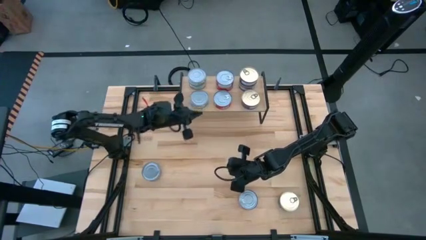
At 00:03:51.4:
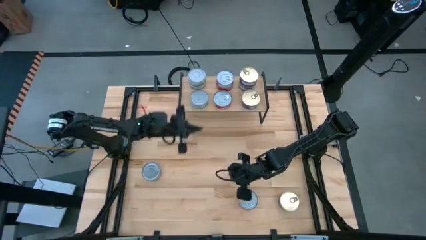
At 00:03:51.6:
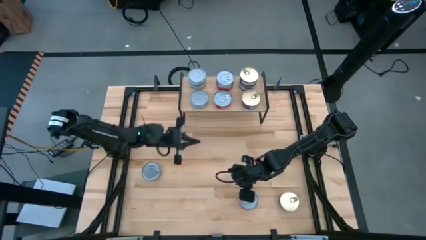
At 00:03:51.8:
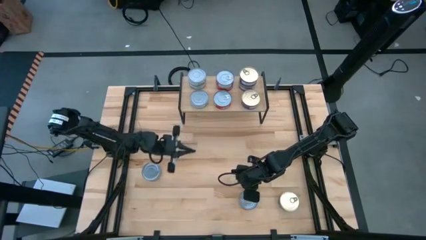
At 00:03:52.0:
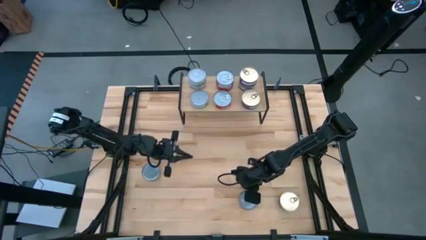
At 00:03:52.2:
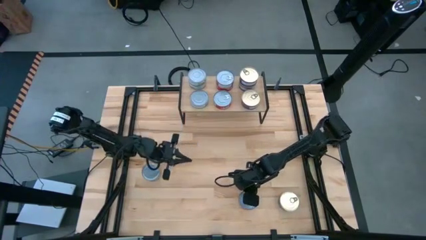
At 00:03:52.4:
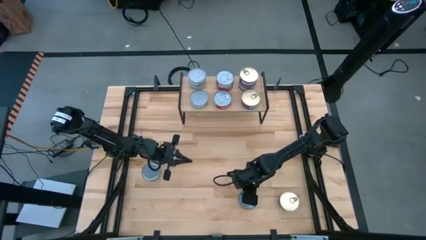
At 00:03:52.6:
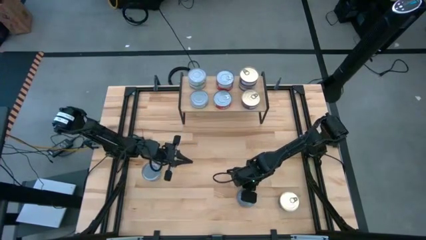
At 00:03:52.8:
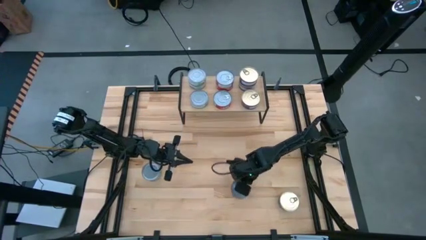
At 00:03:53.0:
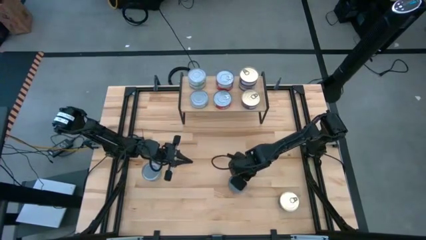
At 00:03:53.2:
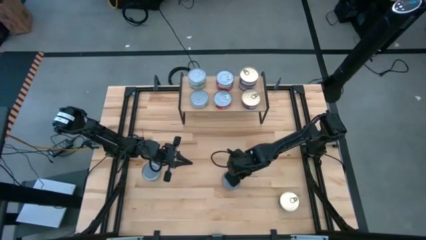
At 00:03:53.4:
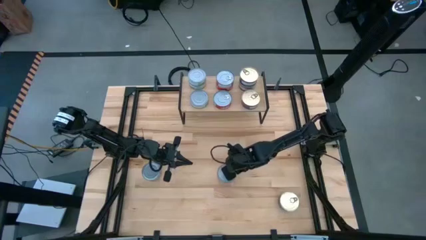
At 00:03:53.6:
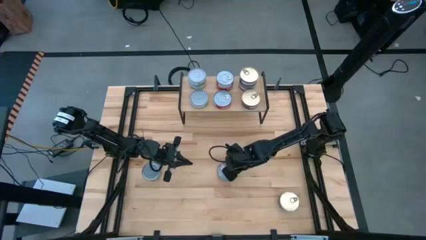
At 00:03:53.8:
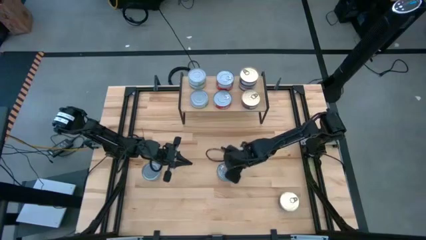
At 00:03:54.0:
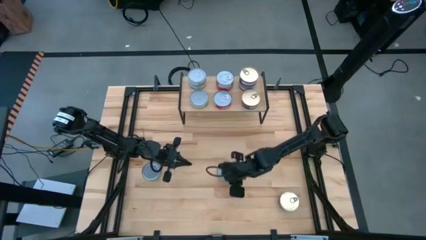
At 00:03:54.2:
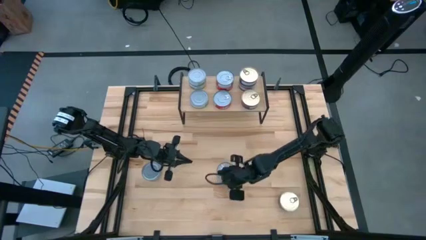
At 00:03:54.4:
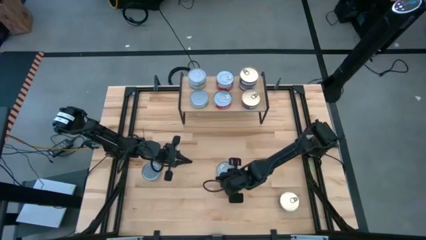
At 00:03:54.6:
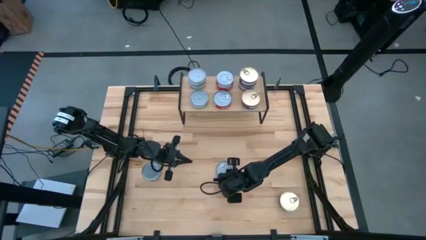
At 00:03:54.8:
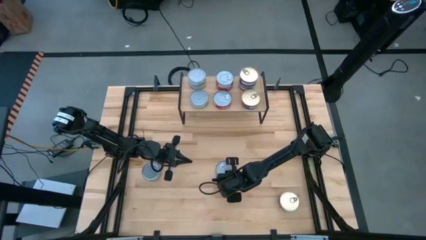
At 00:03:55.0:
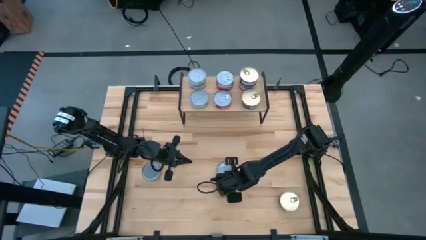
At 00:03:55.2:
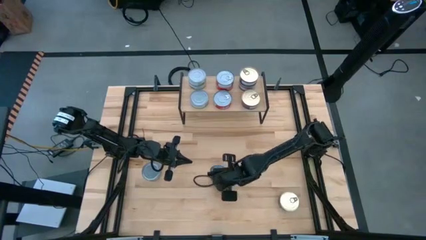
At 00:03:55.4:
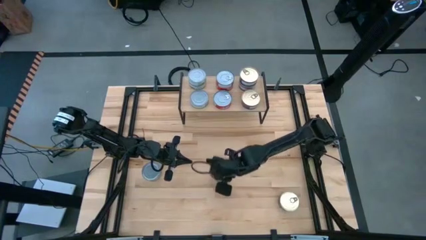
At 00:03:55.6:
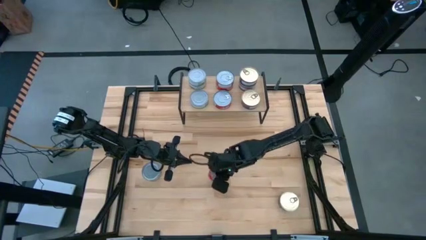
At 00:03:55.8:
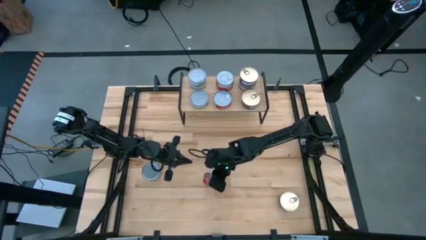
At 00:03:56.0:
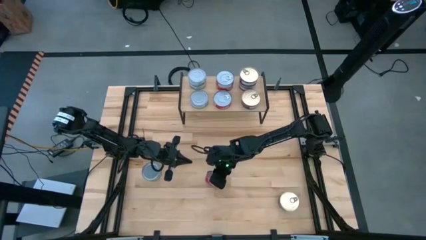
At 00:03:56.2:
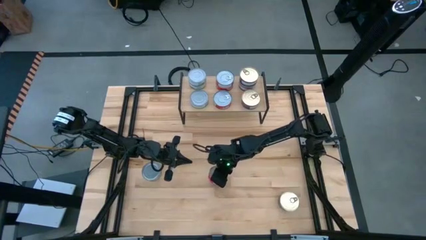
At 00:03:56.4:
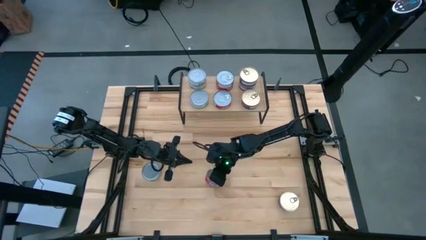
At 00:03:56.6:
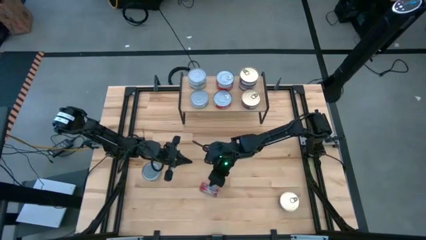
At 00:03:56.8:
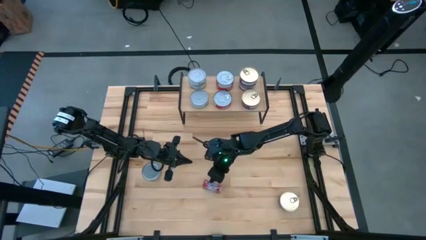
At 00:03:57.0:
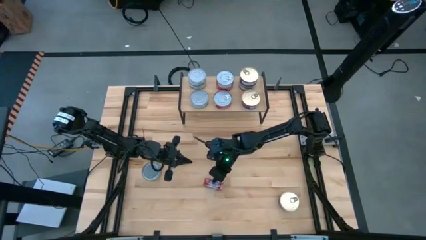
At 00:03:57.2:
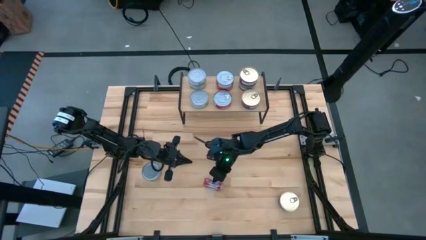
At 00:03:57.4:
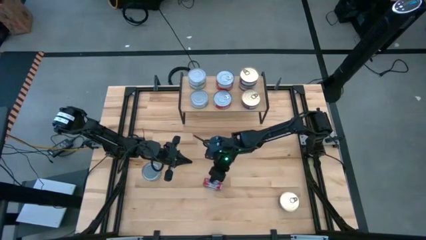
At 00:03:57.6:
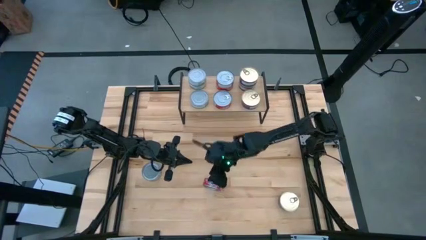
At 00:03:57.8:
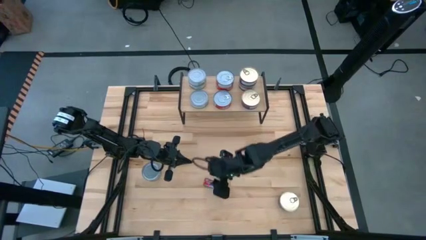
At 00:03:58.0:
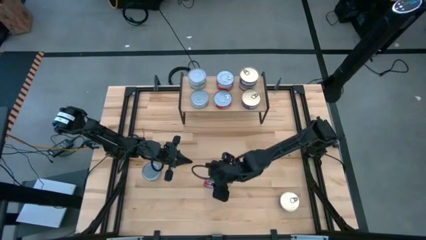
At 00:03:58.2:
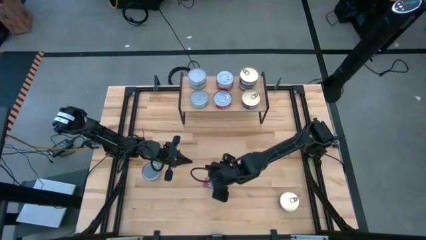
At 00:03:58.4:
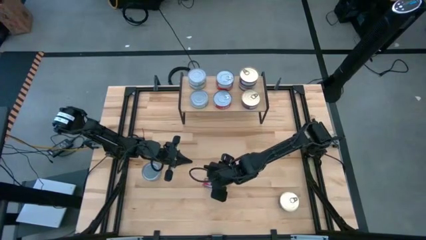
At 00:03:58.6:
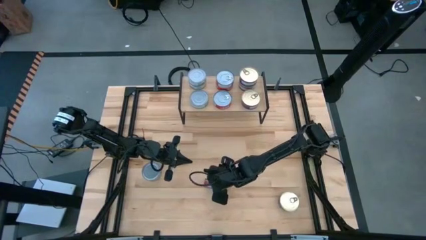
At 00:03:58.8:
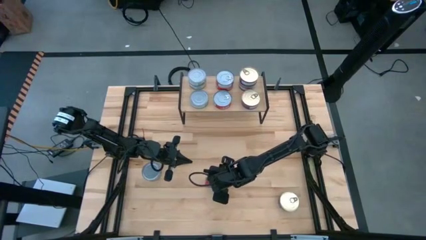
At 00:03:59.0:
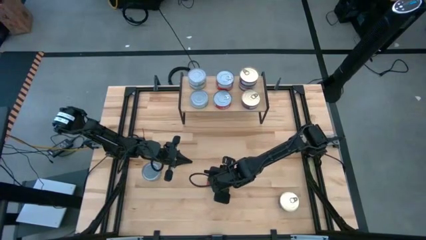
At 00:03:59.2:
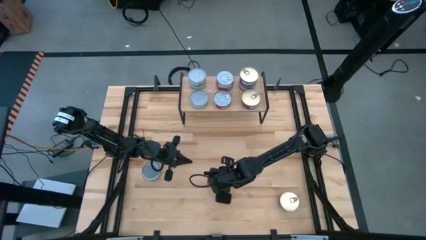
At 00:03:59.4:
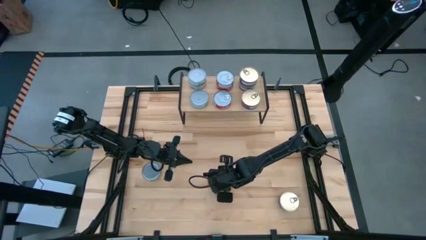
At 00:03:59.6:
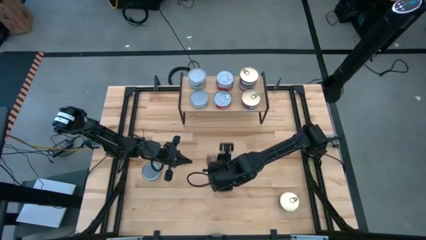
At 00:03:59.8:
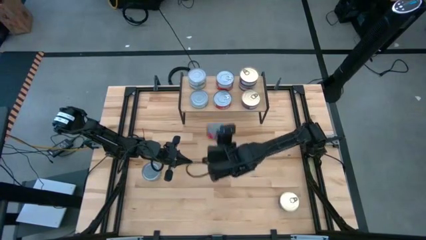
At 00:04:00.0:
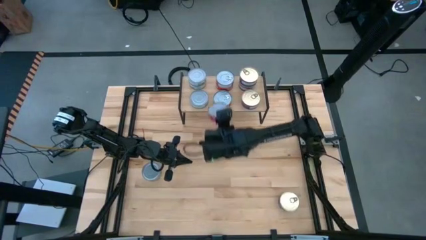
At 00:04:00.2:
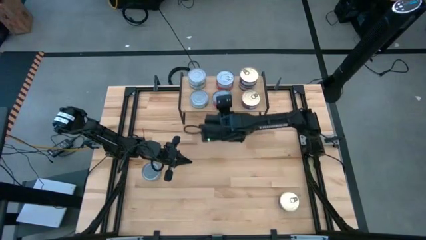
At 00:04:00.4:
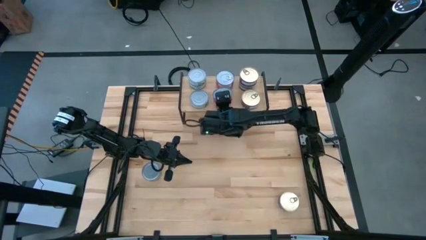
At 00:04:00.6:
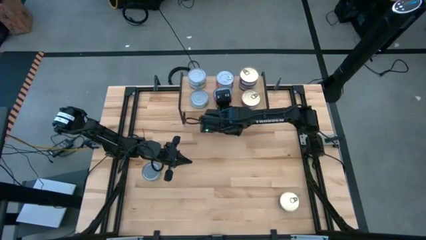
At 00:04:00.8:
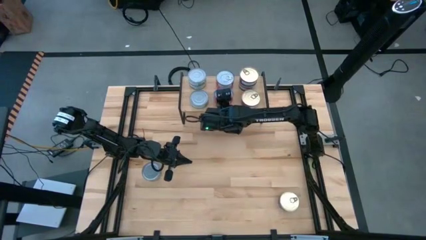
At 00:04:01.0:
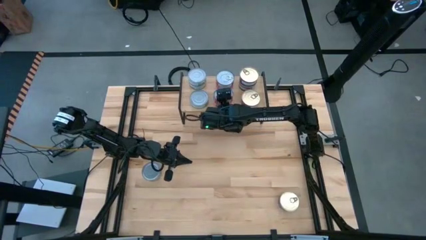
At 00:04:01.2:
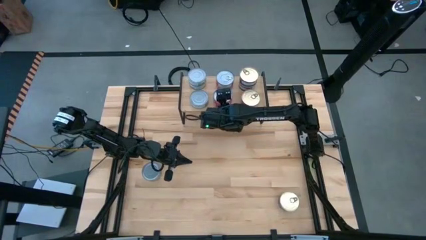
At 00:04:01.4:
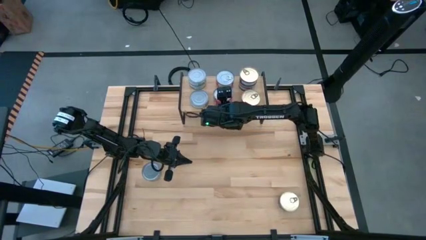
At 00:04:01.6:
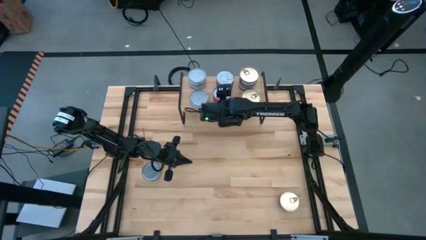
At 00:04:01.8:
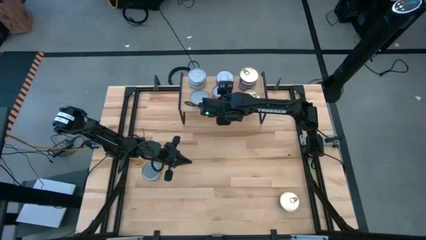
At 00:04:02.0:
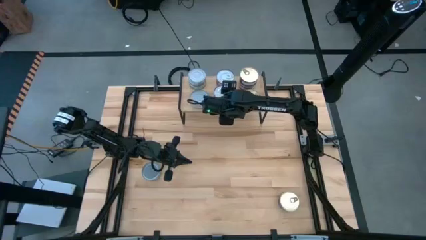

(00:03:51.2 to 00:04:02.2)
Task: Stack canned seafood by type on shelf
Stack the red tuna can on top of the red tuna can on the shelf

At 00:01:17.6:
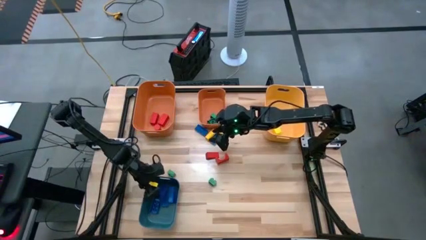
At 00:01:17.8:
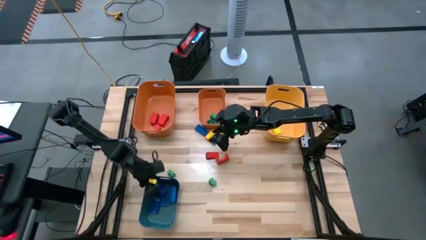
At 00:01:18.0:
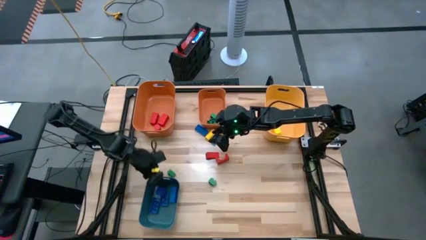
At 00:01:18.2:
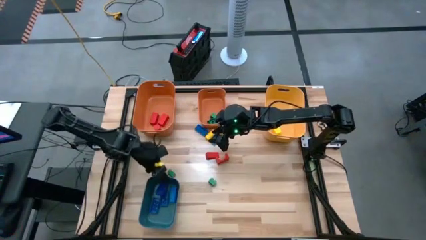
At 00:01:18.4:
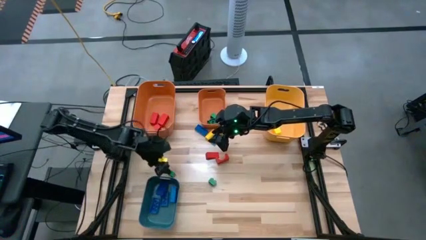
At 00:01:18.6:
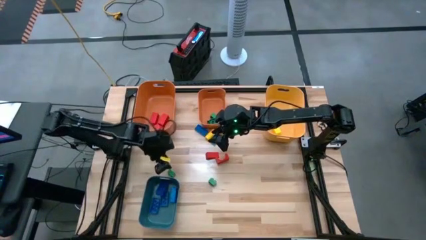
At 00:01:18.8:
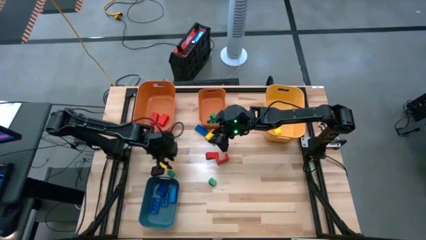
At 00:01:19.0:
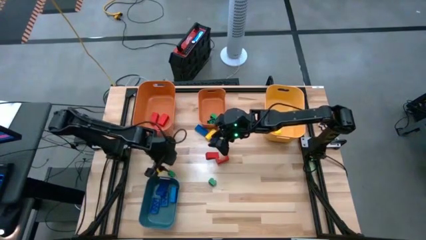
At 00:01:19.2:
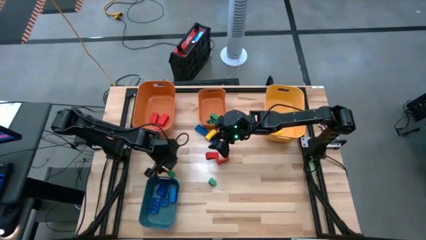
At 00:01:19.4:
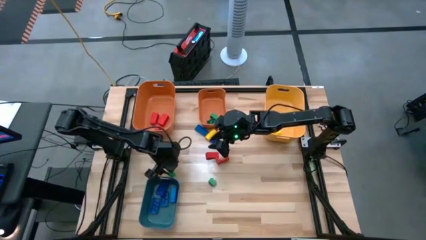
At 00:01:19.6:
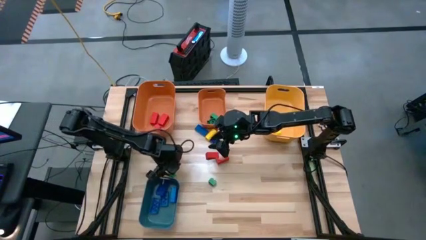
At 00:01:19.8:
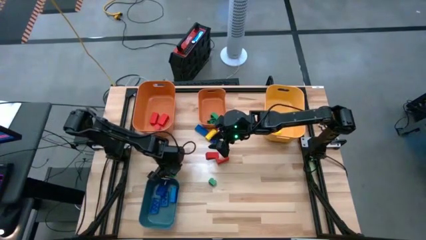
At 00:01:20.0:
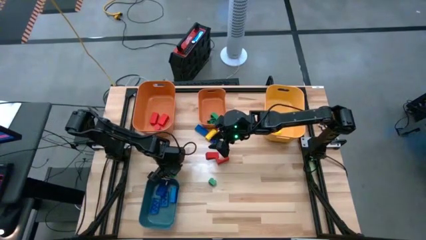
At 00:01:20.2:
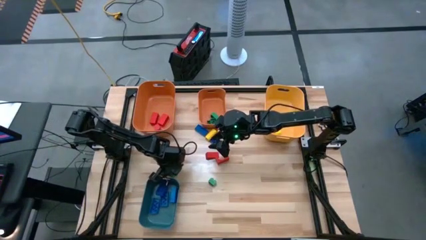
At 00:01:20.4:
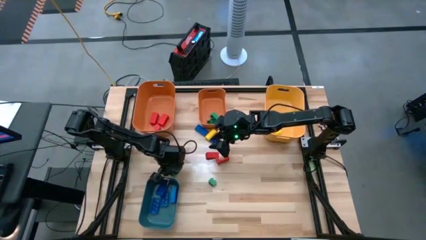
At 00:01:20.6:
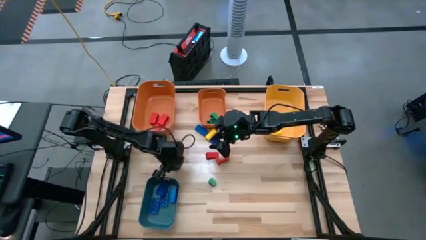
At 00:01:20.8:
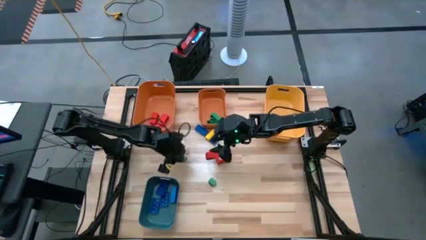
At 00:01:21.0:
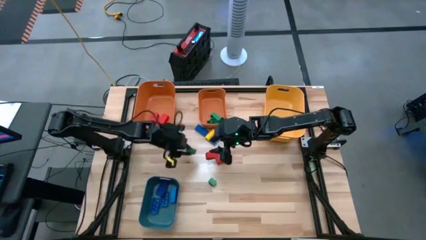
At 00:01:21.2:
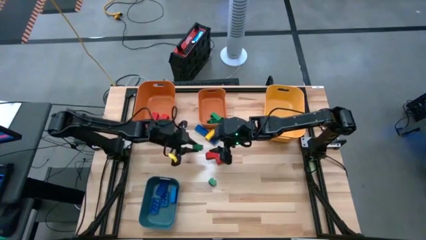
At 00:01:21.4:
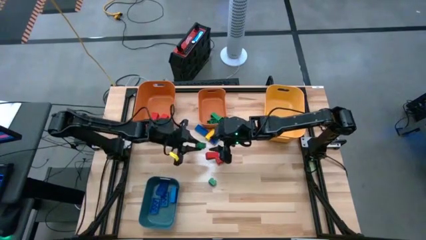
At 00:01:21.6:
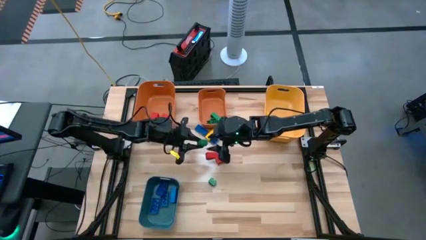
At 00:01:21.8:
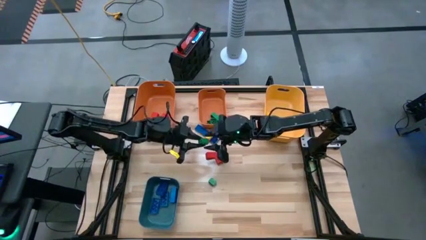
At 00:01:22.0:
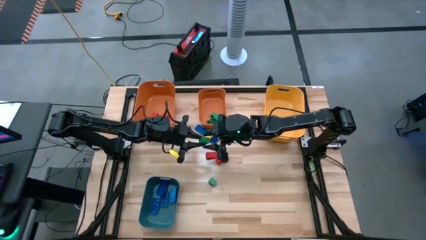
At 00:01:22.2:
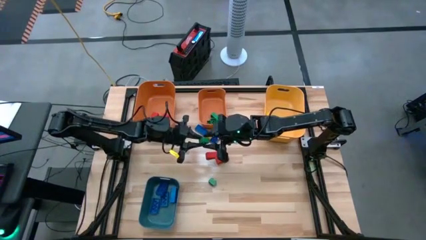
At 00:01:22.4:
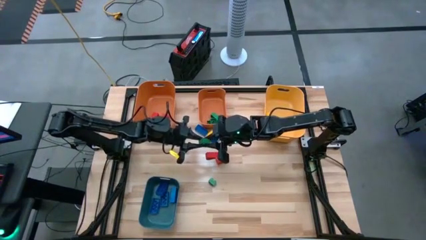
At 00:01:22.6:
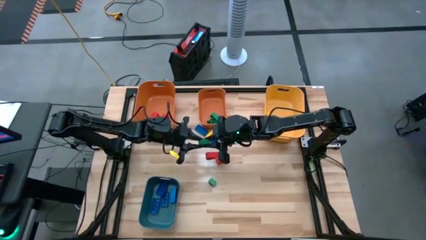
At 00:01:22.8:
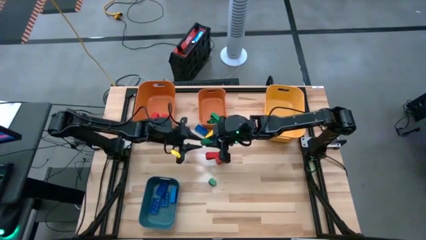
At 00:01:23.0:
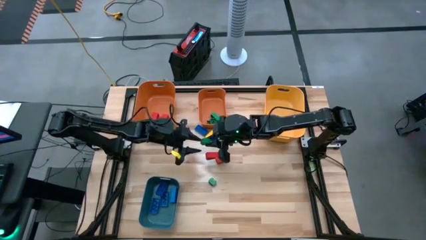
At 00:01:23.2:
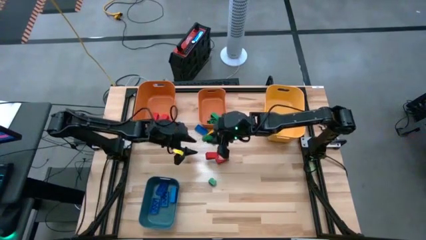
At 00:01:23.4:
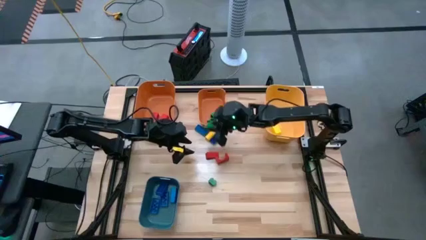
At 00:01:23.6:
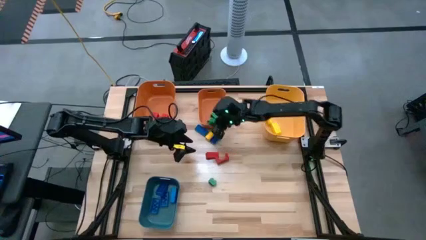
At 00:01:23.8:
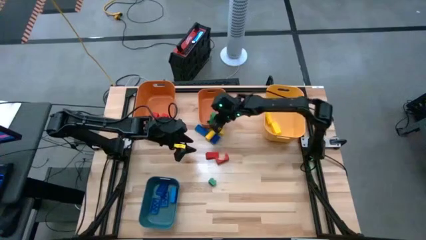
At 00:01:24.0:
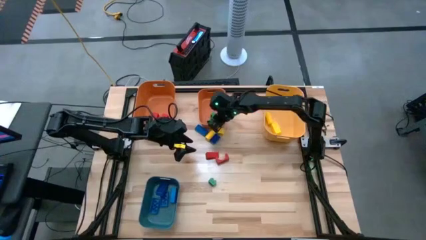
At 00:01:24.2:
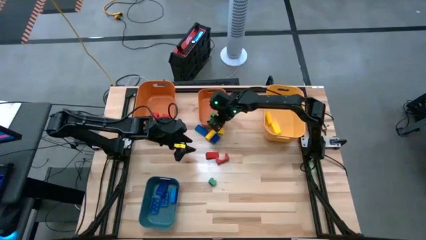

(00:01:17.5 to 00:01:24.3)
Task: Sort blocks
Put the green game piece into the right orange bin
